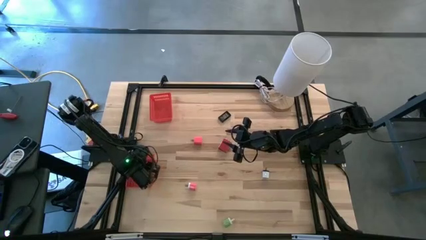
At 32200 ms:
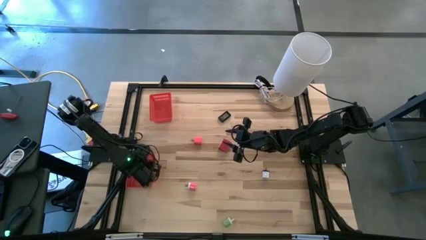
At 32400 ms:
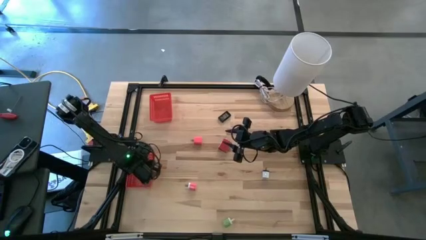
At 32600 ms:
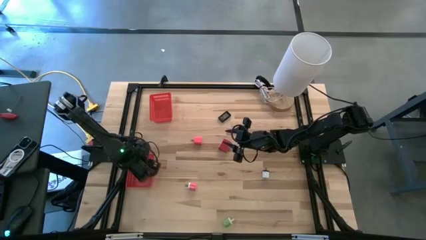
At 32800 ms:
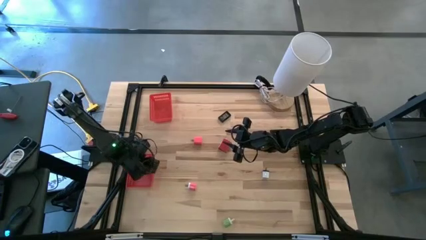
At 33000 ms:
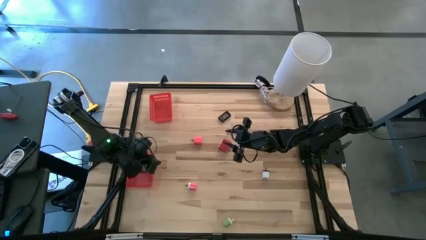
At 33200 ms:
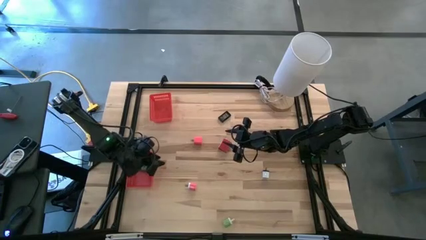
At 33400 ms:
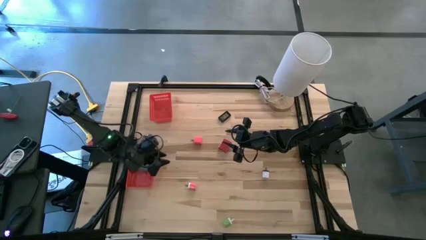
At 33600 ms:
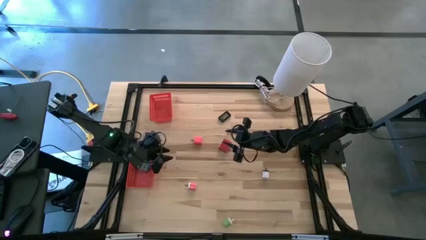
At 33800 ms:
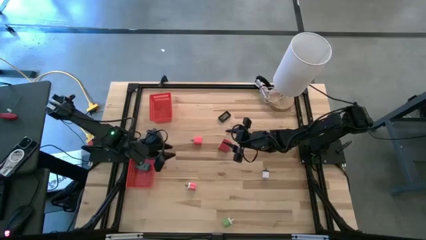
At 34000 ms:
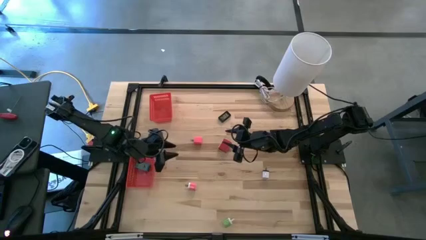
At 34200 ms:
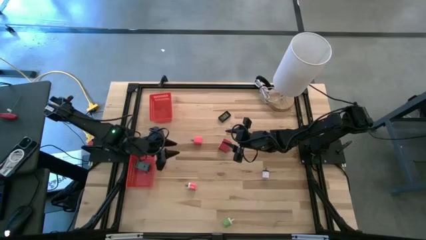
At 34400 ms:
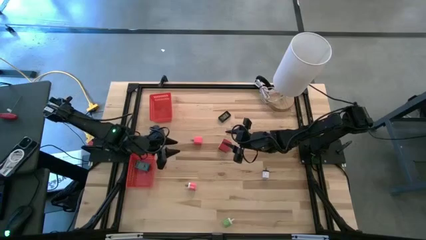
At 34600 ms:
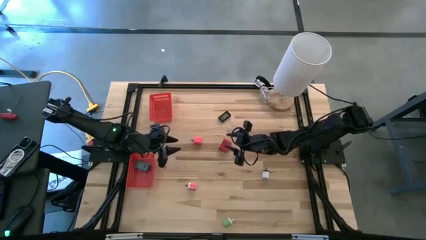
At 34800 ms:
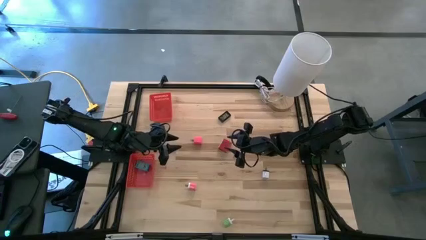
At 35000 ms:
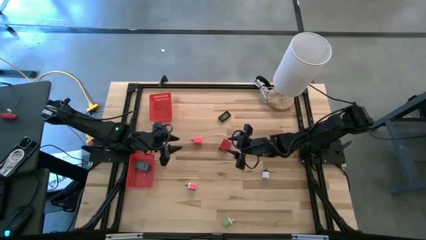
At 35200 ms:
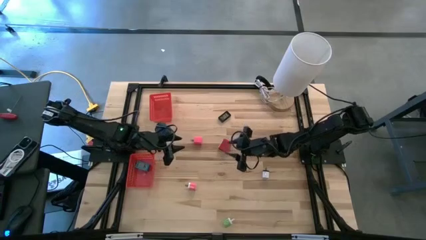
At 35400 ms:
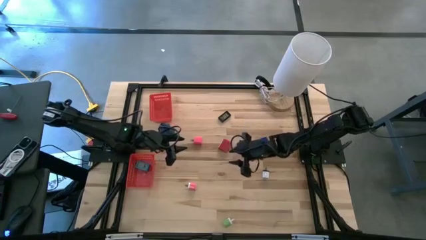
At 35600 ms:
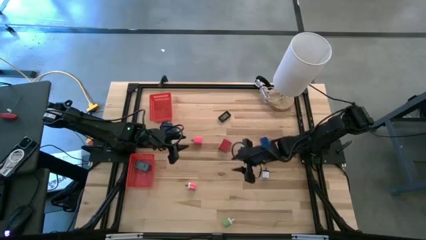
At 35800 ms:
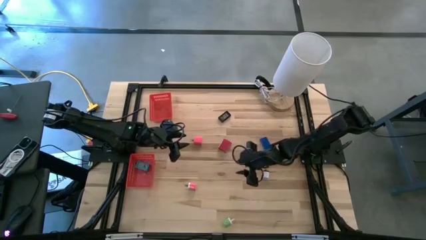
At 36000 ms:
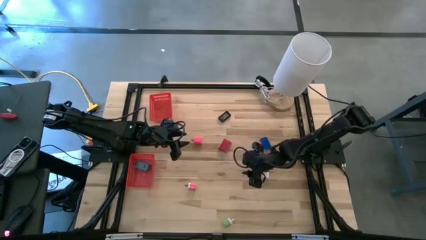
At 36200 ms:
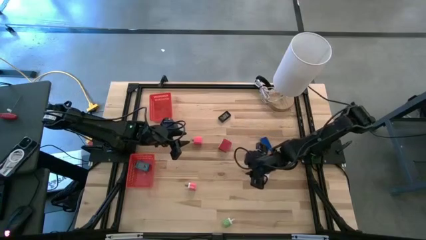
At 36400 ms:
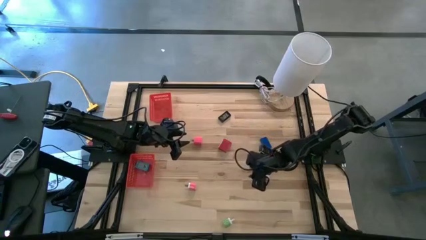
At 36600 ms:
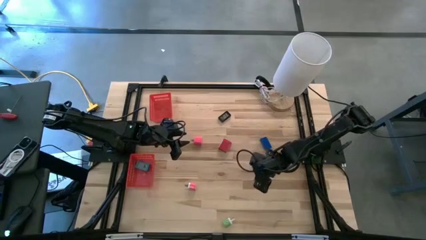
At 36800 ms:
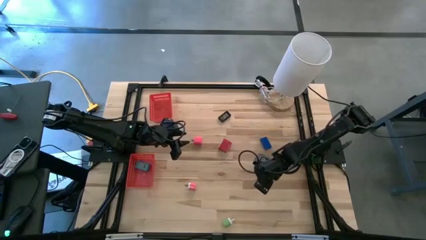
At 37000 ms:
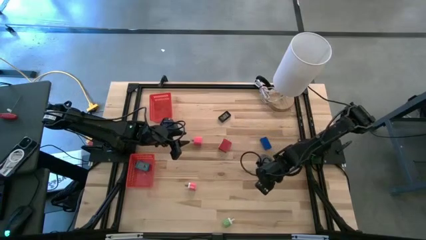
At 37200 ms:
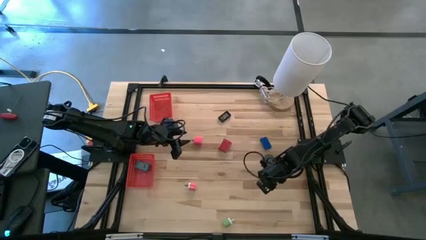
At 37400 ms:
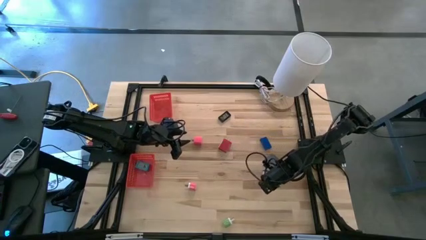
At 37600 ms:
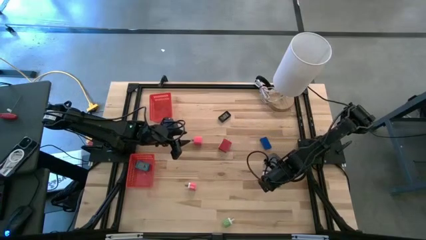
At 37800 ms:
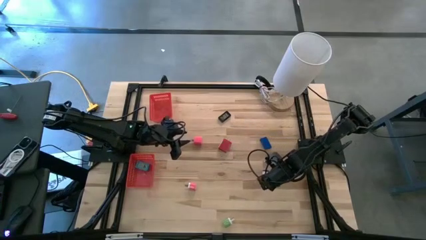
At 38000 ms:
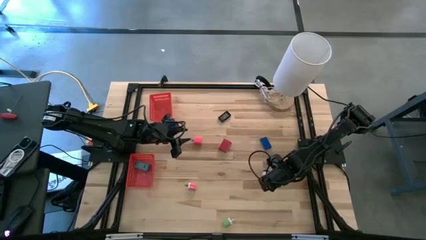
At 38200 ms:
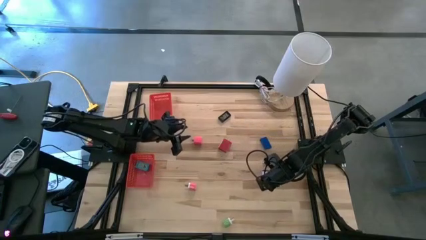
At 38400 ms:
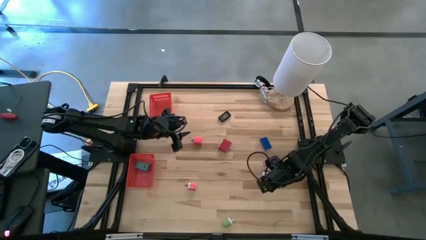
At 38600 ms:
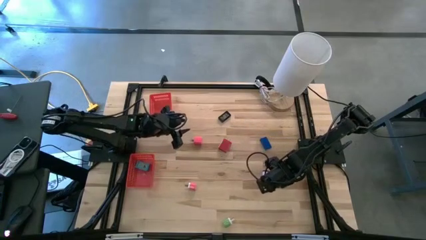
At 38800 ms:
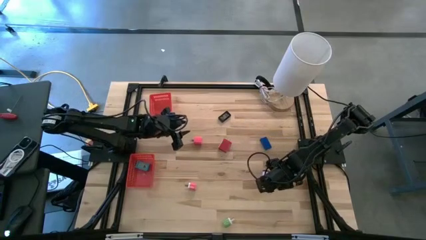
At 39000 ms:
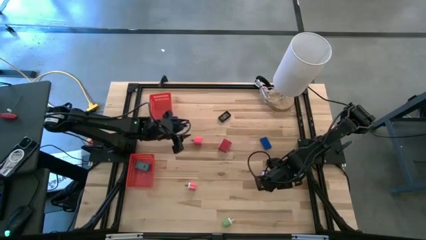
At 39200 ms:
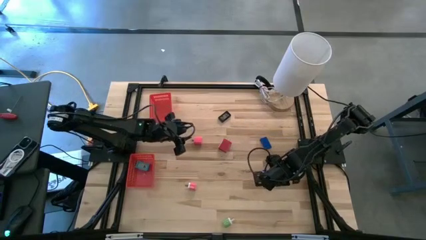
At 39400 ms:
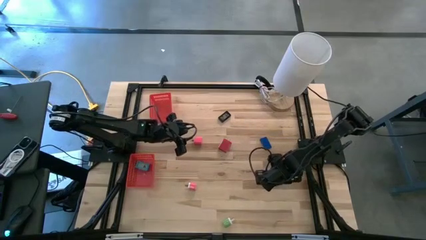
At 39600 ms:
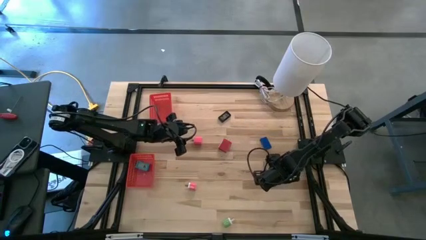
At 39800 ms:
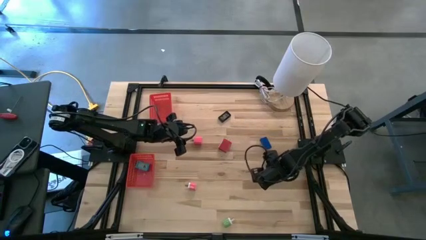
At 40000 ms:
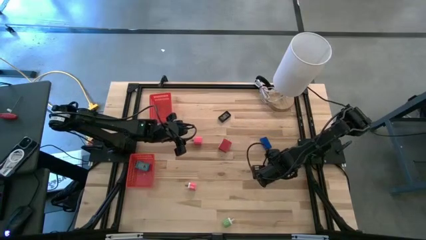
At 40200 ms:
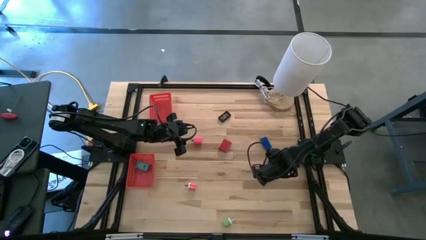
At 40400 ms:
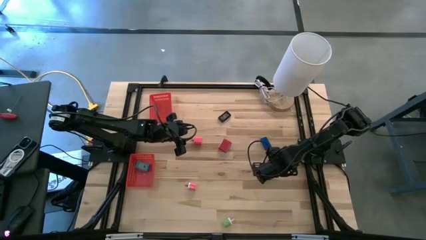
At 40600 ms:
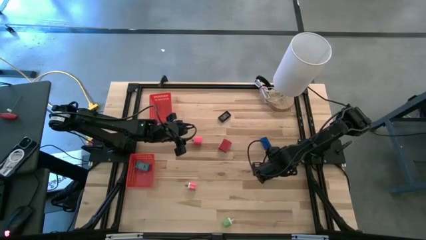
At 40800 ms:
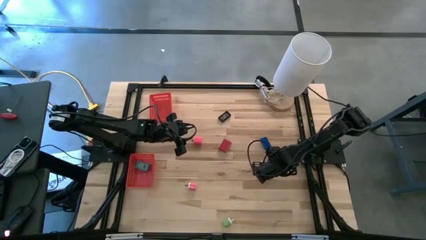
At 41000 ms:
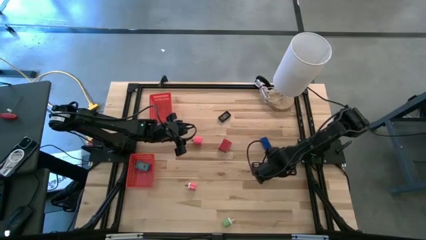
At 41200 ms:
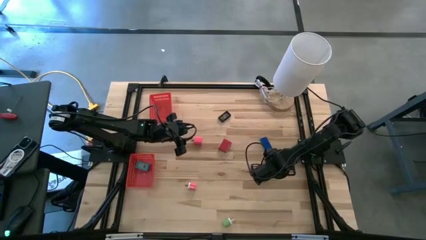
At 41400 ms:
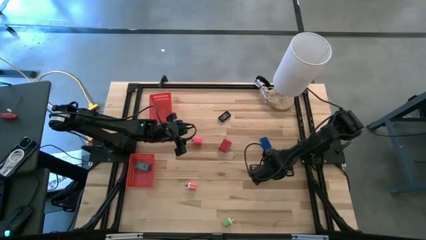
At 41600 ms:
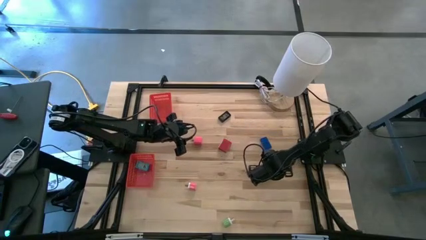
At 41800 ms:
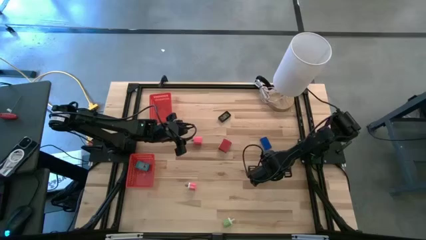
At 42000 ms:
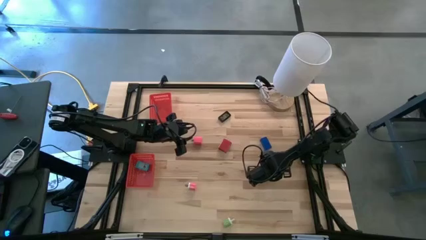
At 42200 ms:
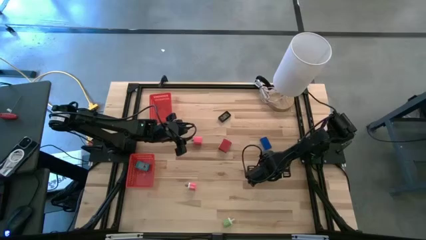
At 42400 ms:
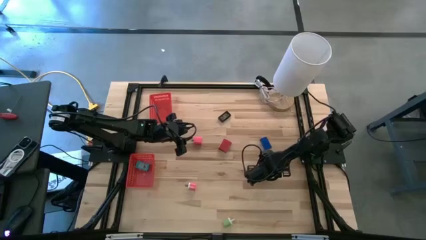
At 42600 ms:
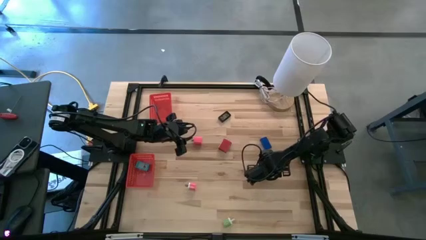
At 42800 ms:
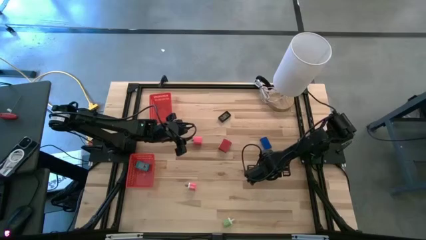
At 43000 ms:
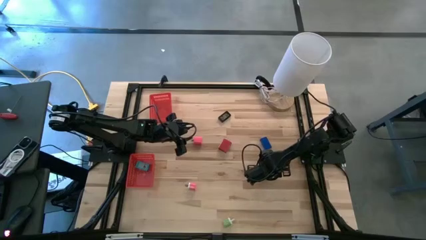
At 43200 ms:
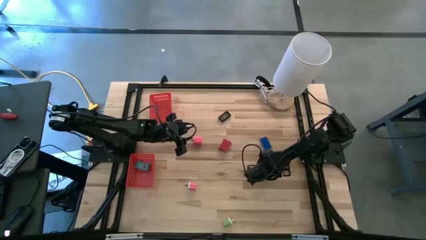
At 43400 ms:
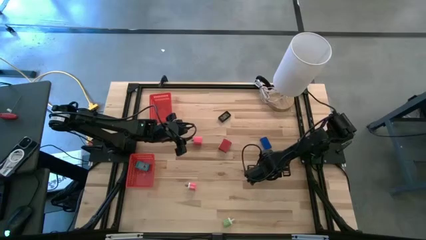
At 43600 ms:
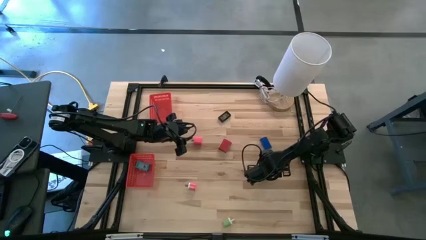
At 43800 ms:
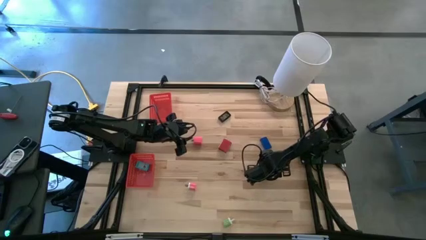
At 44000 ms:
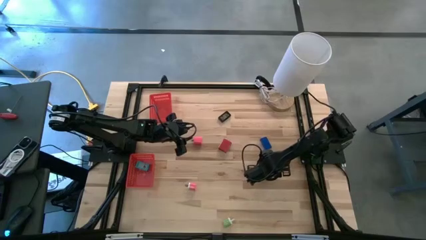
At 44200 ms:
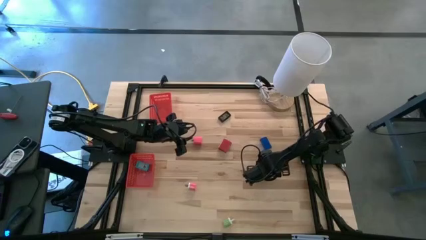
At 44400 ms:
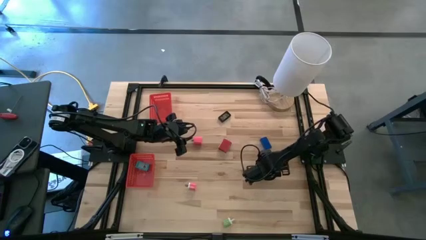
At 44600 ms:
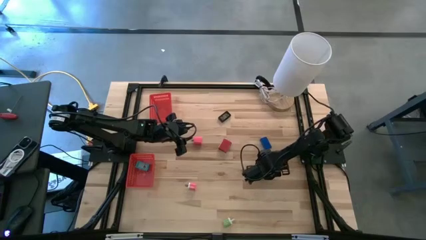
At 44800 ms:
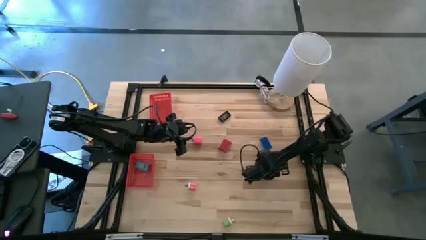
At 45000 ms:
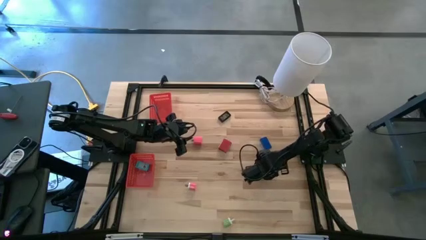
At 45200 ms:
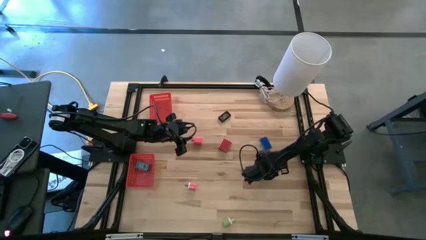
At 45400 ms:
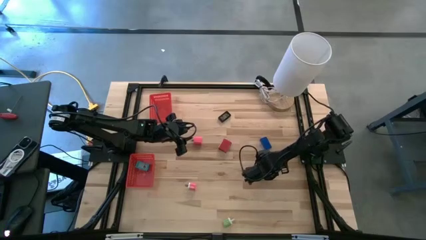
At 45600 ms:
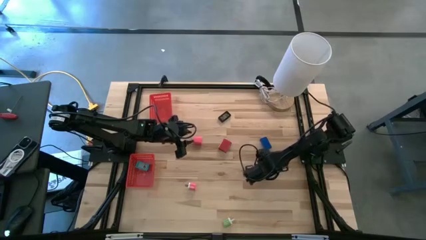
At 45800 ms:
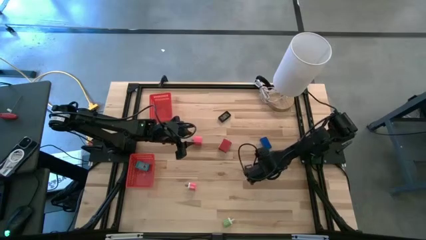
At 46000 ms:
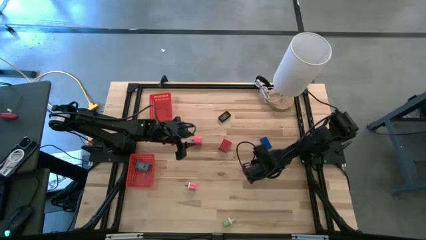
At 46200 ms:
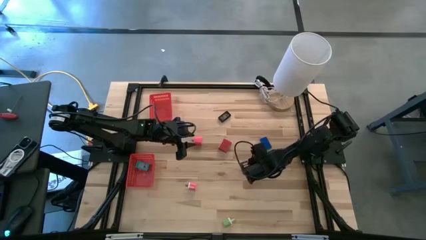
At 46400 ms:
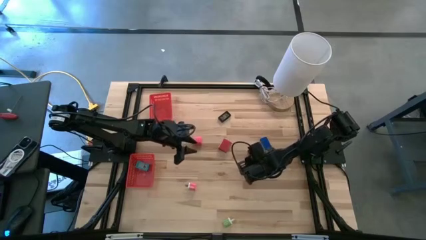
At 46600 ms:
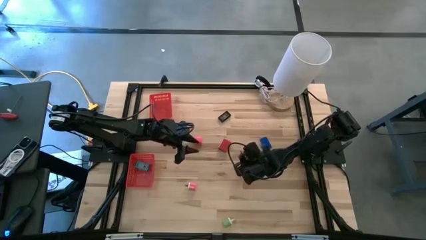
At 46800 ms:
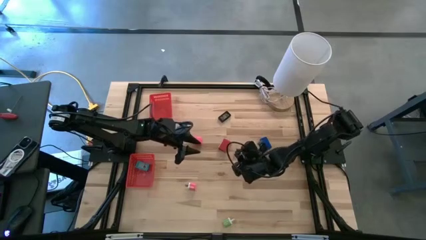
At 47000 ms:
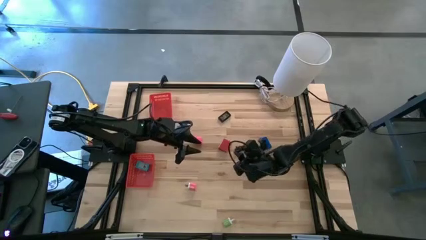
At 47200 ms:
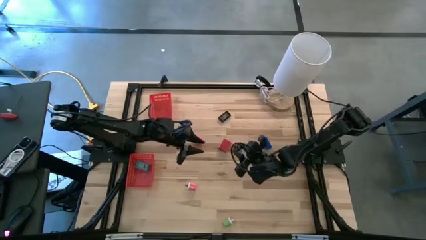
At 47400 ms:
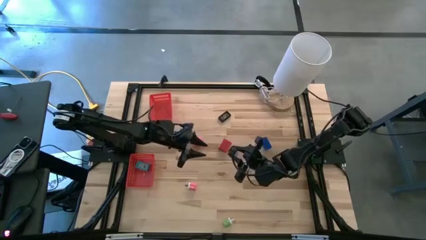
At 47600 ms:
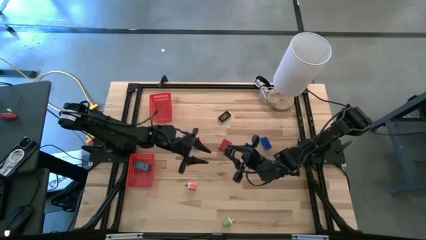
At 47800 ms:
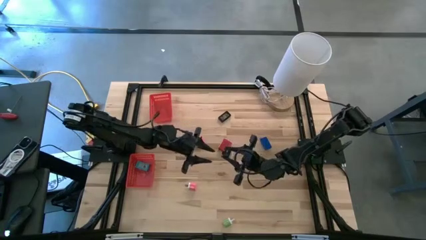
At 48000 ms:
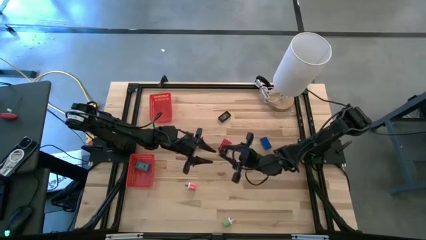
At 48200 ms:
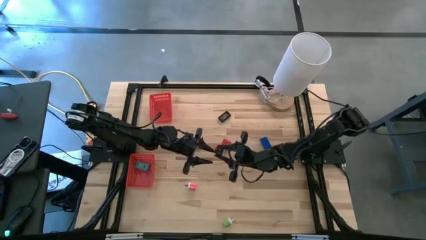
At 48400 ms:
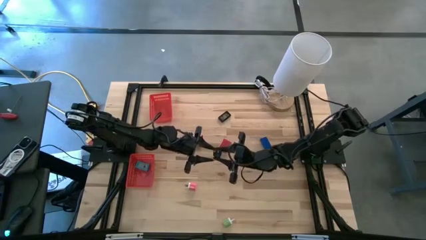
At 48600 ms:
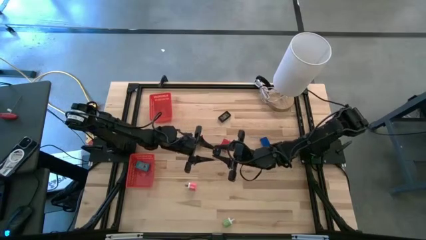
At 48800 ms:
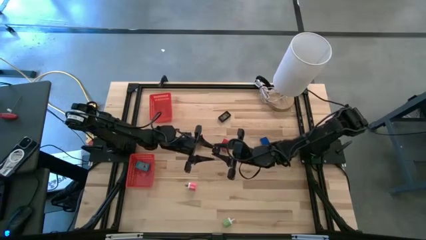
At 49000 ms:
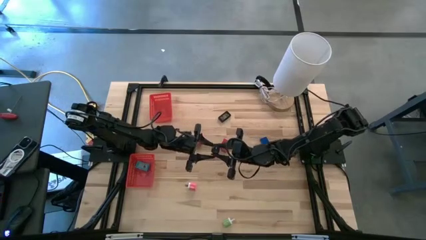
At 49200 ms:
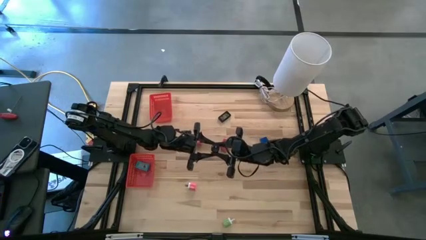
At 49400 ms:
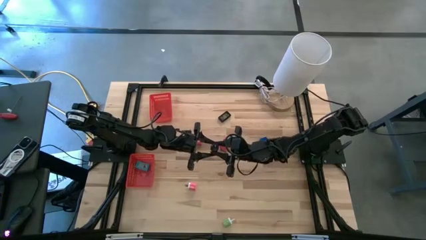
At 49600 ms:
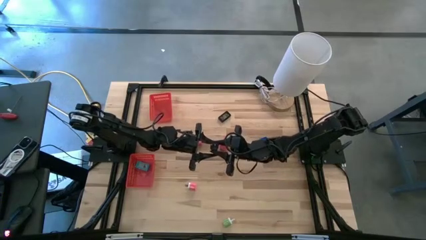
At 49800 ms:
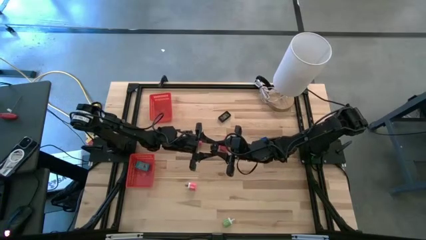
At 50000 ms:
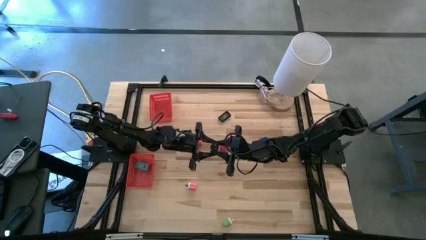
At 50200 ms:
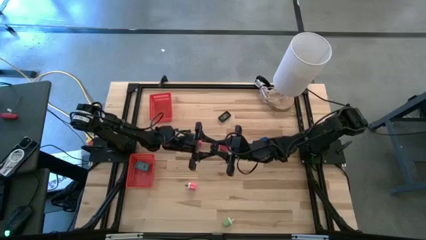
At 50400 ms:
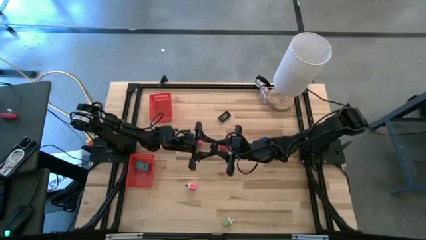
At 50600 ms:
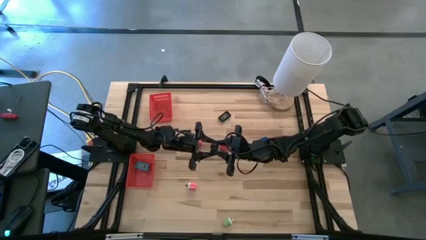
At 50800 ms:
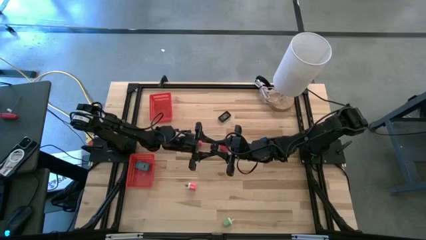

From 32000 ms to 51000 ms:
Task: Pick & Place Office items
Put the white charger adapter into the top red bin
